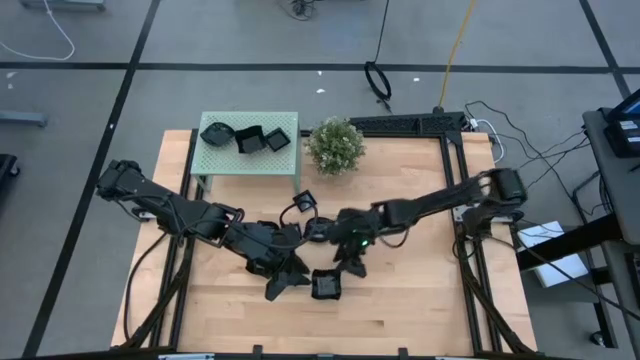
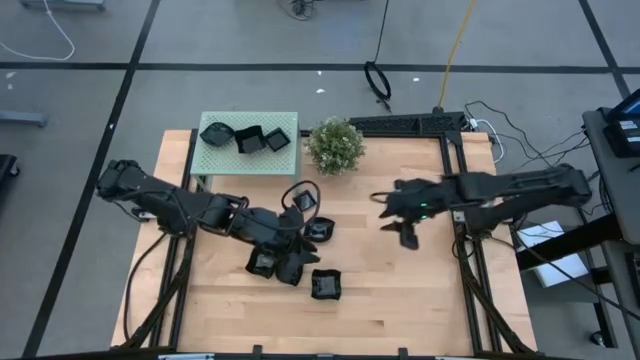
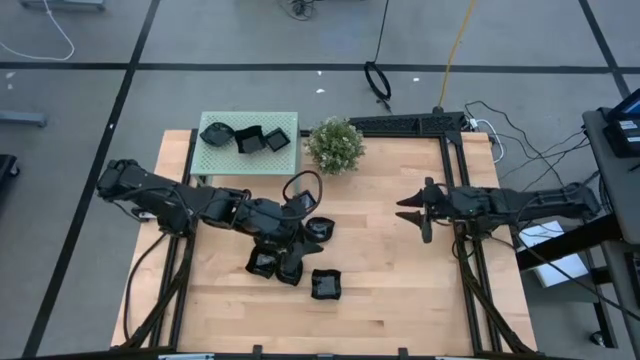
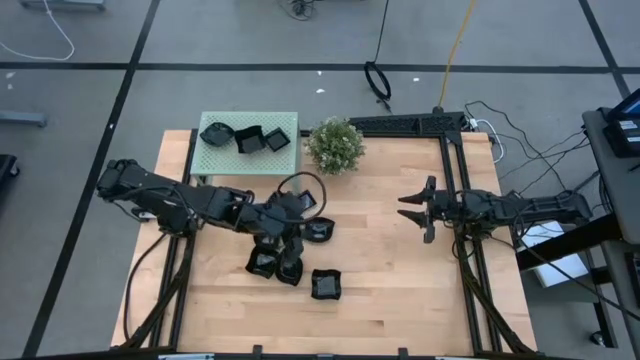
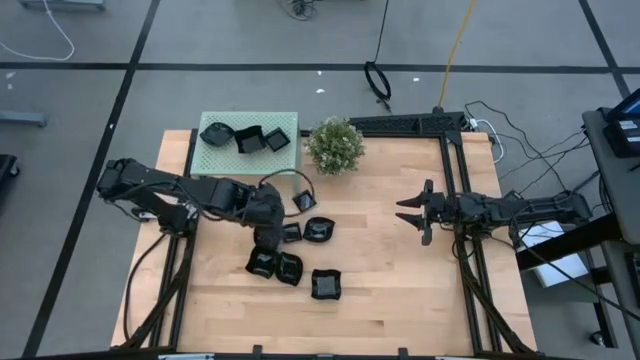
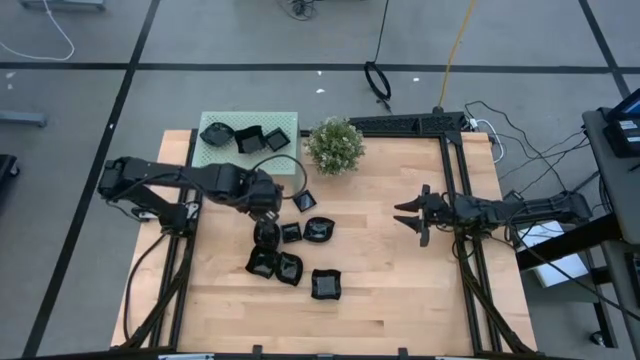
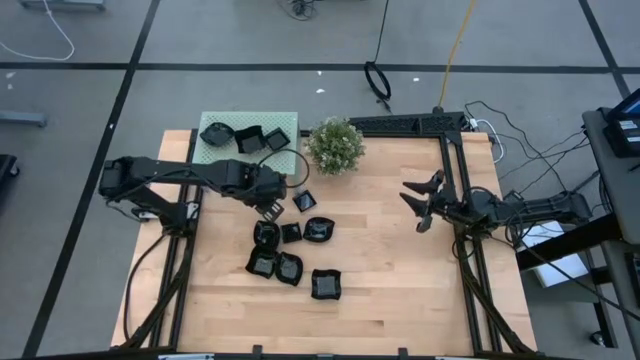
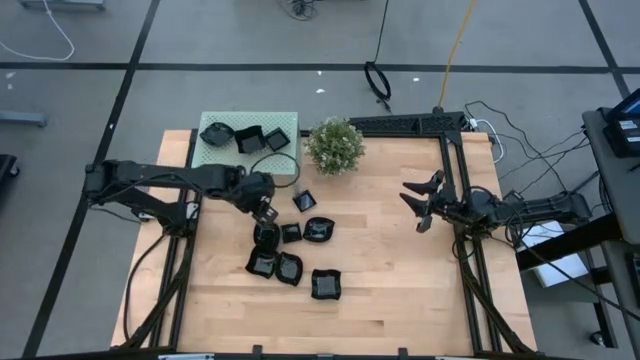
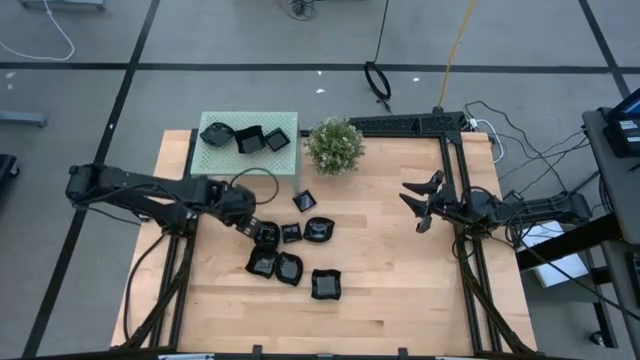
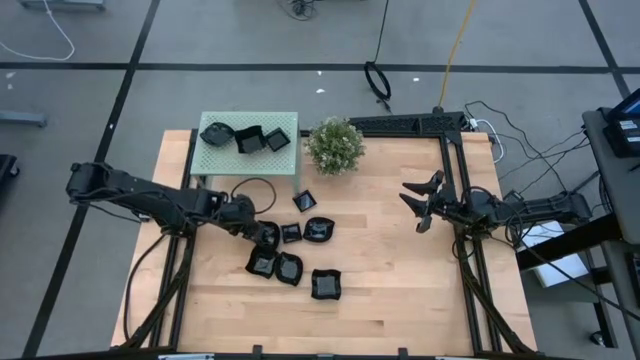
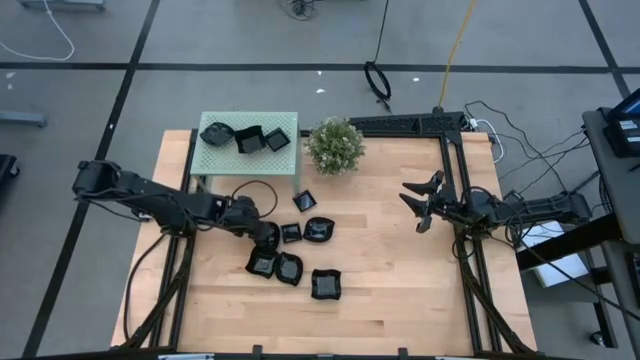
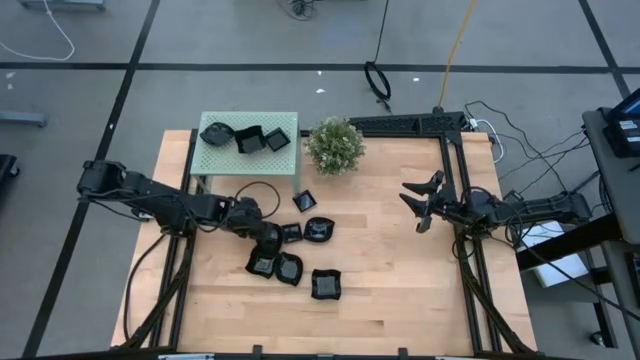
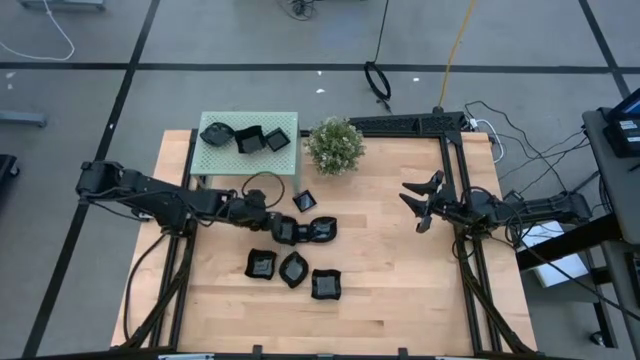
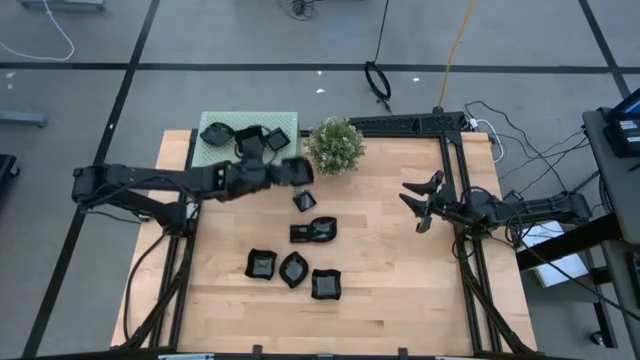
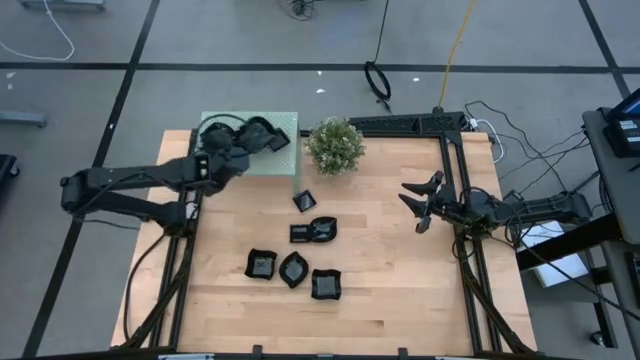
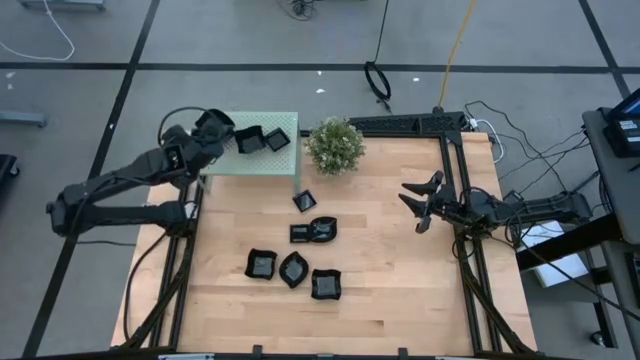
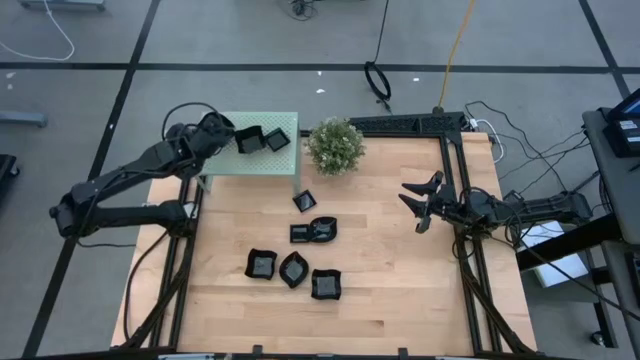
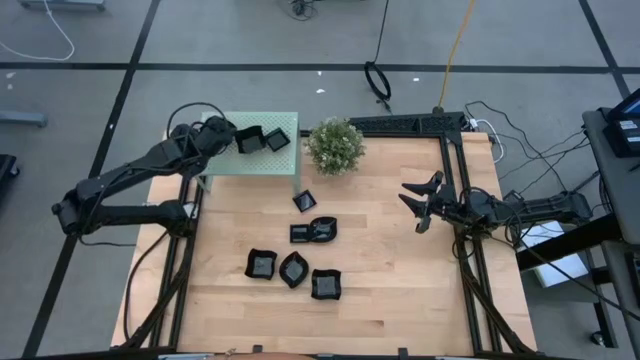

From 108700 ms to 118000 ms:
Task: Pick & Place Mini shaped plates
Stack the leaf shape plate on top of the leaf shape plate on the shelf

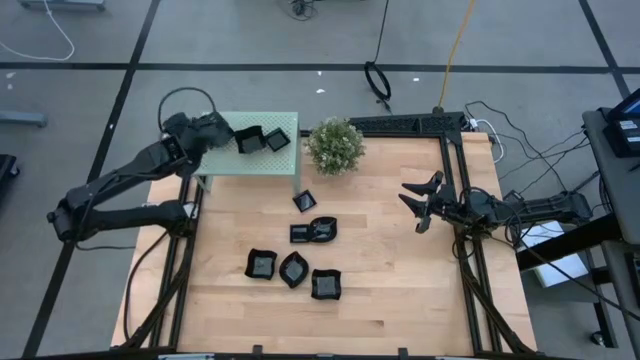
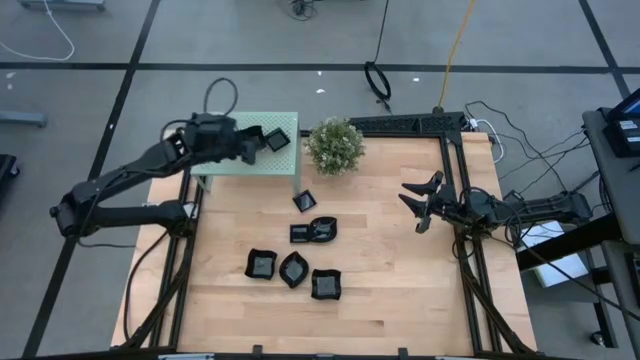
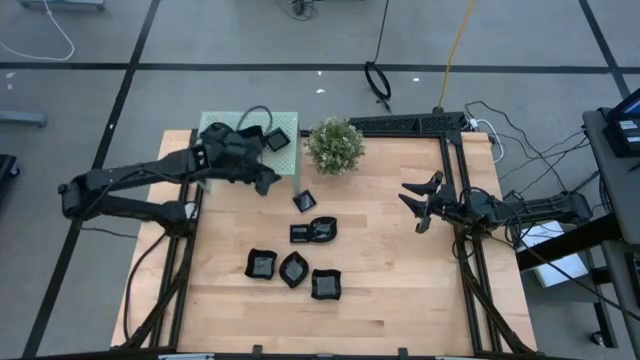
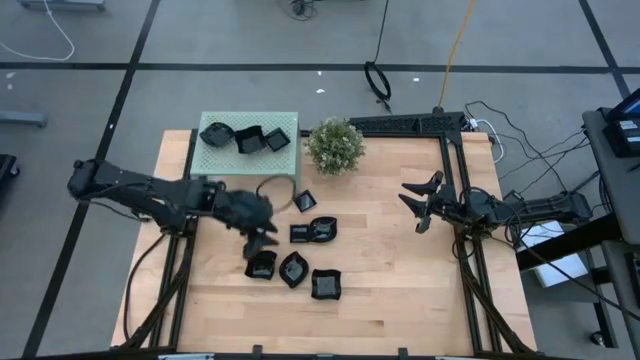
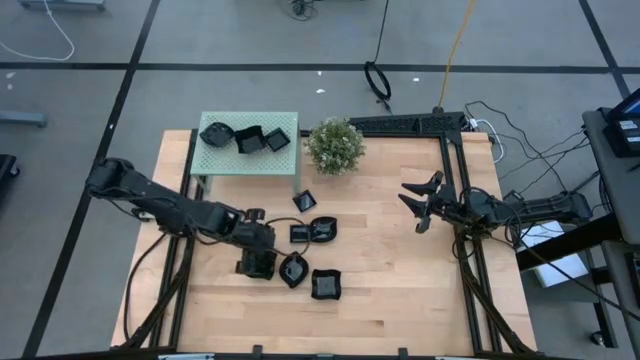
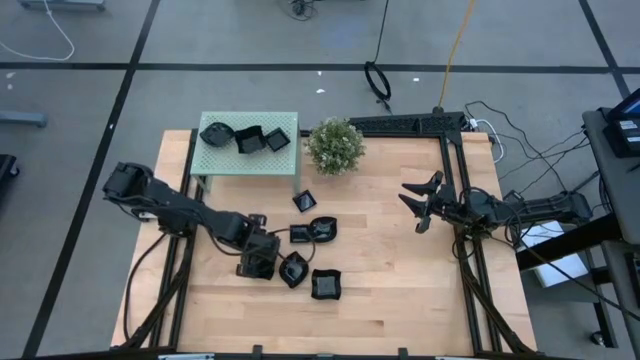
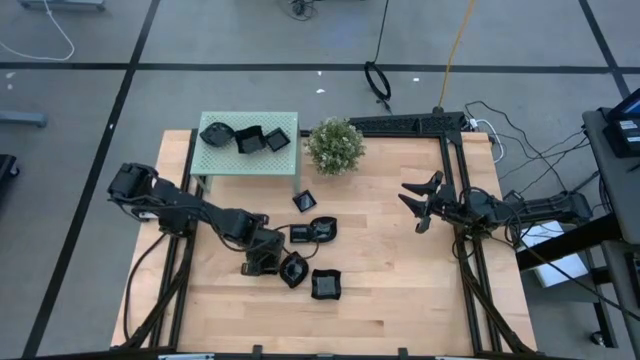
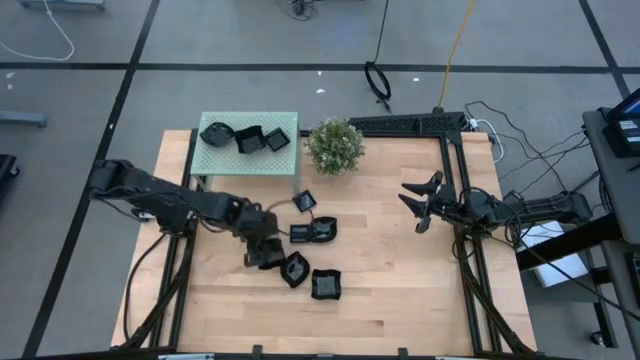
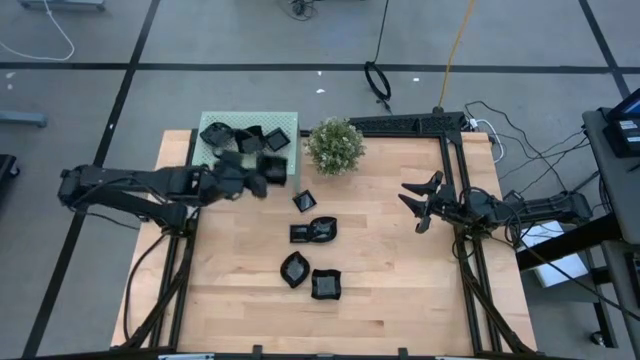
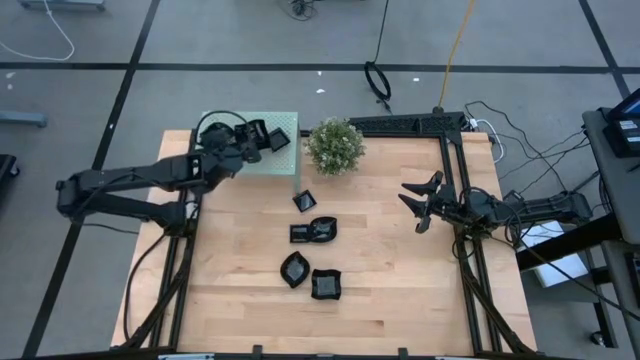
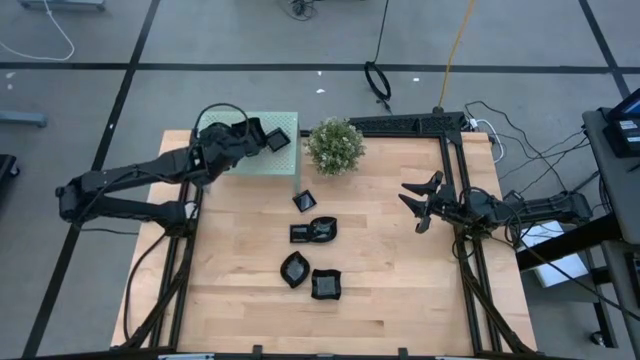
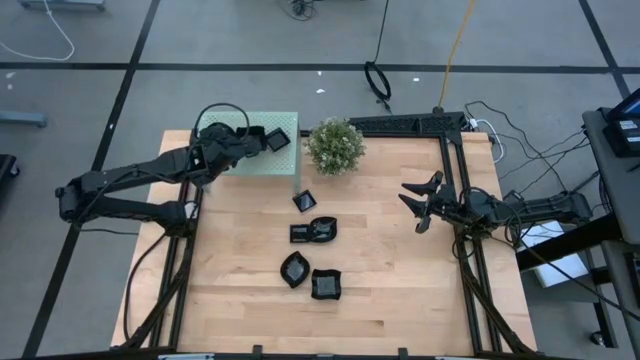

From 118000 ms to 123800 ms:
Stack the distorted square plate on top of the distorted square plate on the shelf

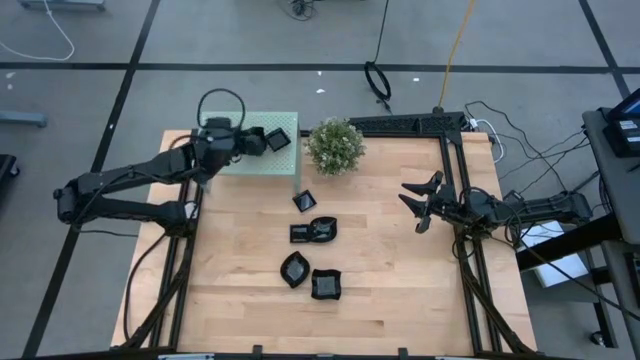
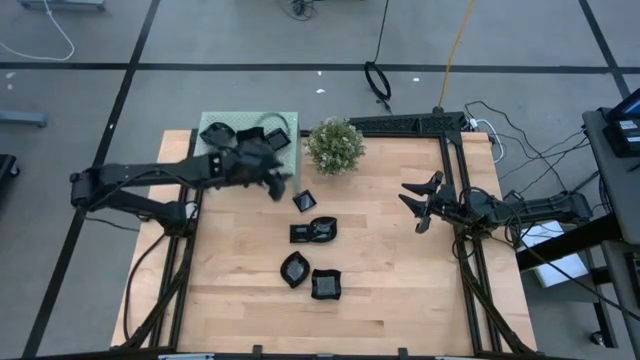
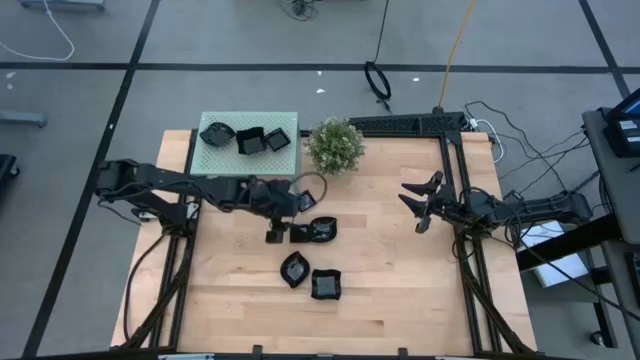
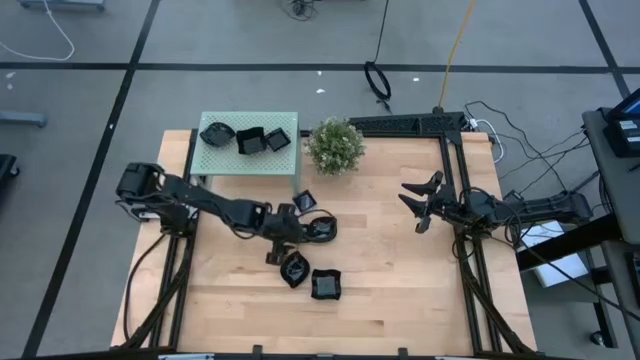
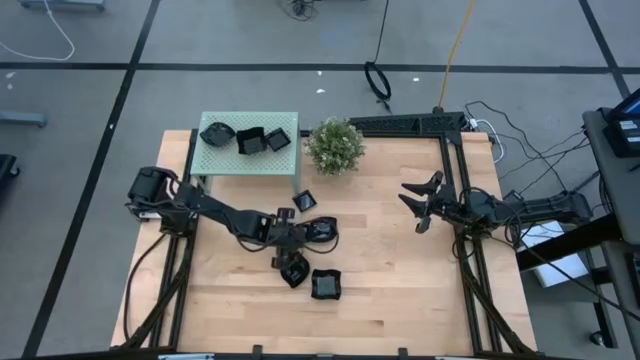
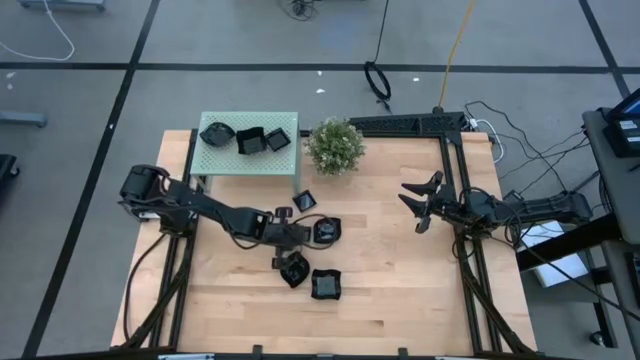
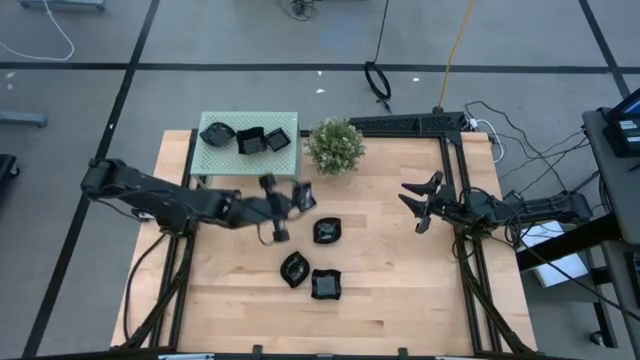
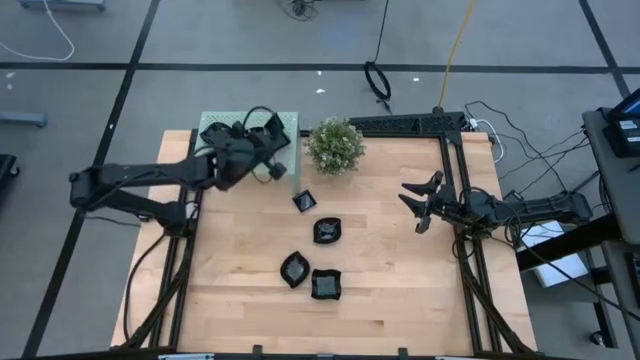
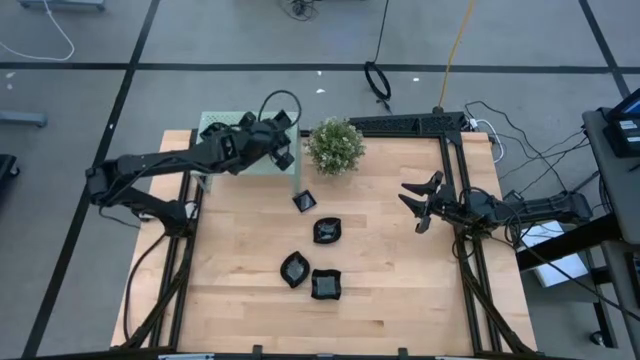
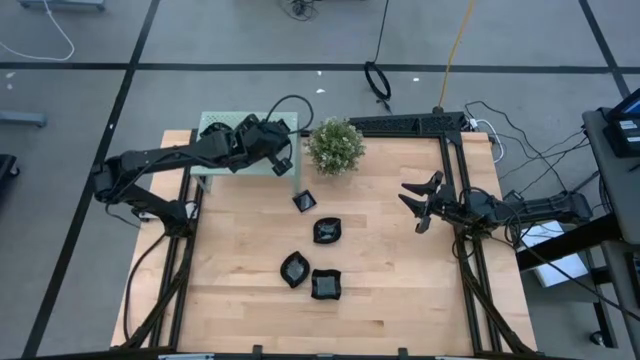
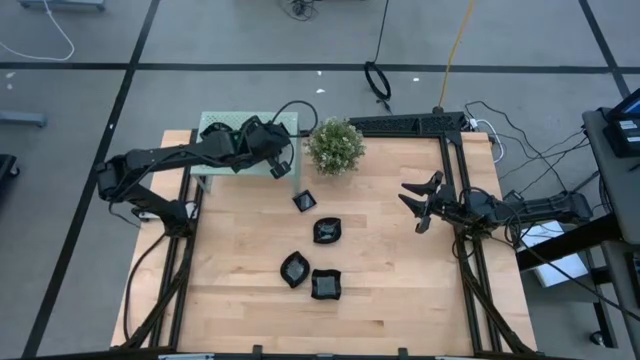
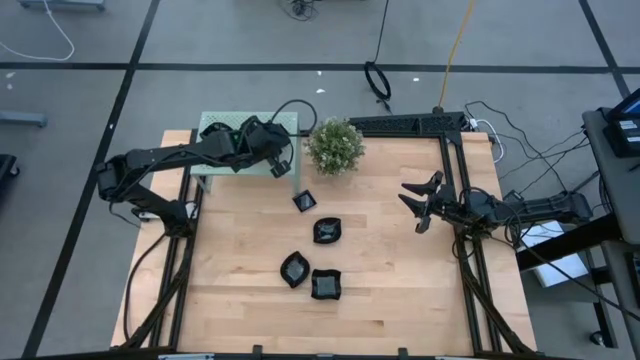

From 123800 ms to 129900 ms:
Stack the square plate on top of the square plate on the shelf
